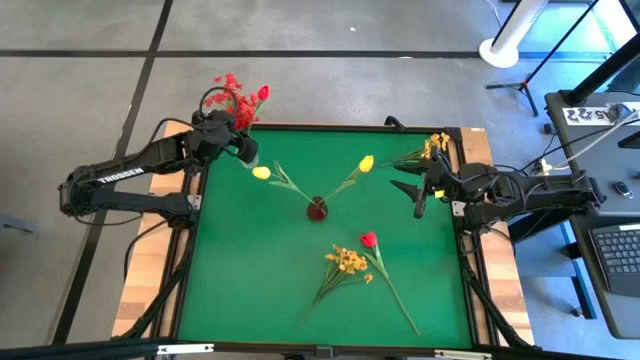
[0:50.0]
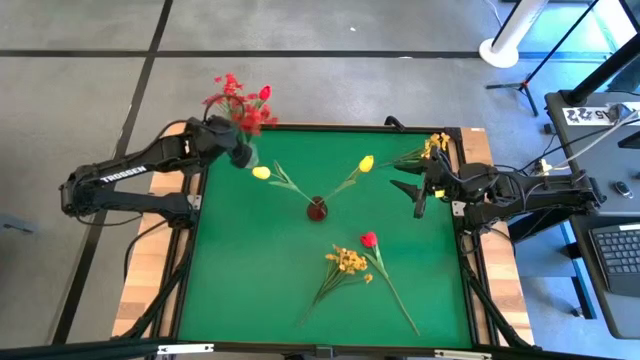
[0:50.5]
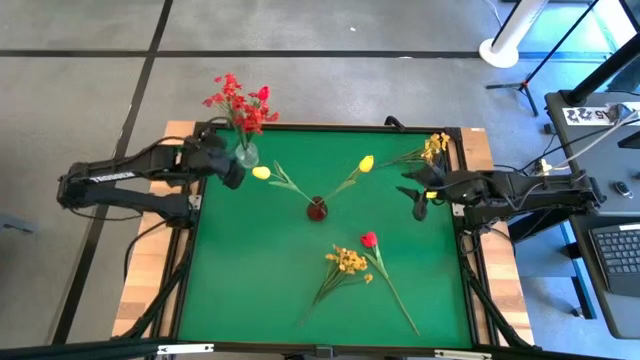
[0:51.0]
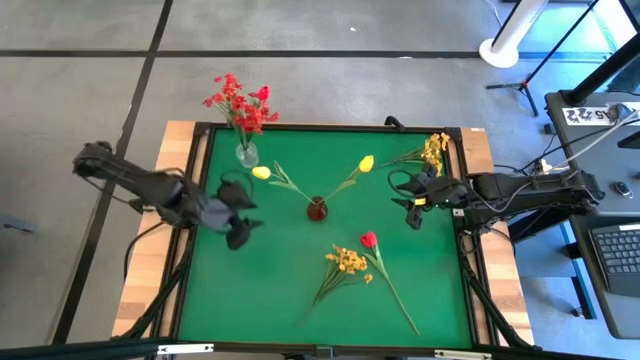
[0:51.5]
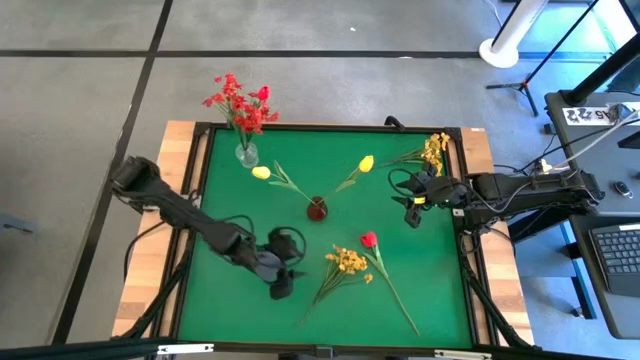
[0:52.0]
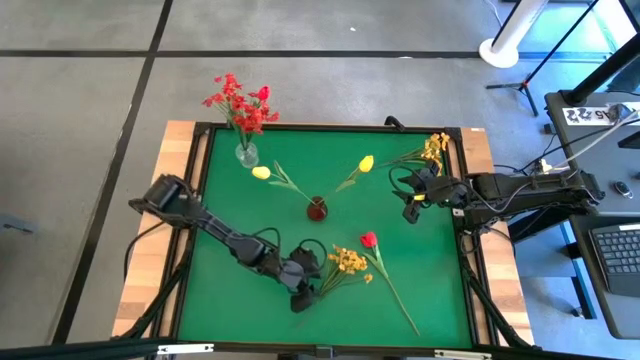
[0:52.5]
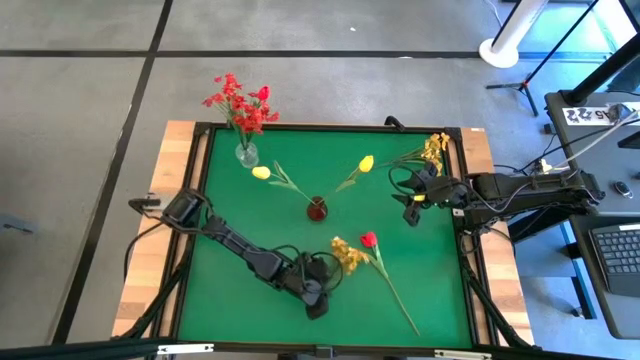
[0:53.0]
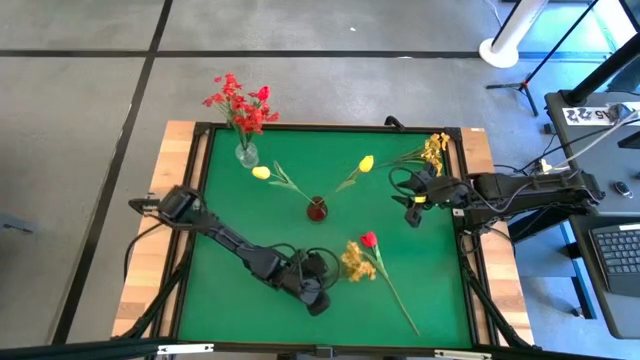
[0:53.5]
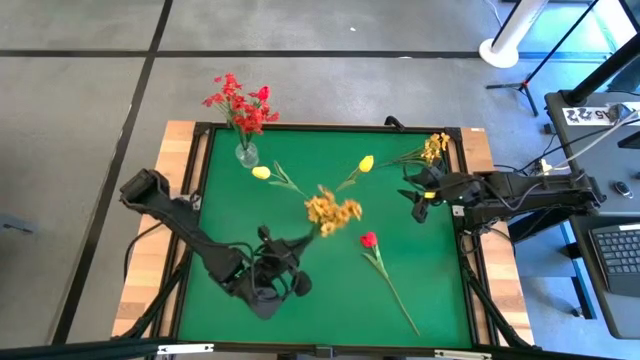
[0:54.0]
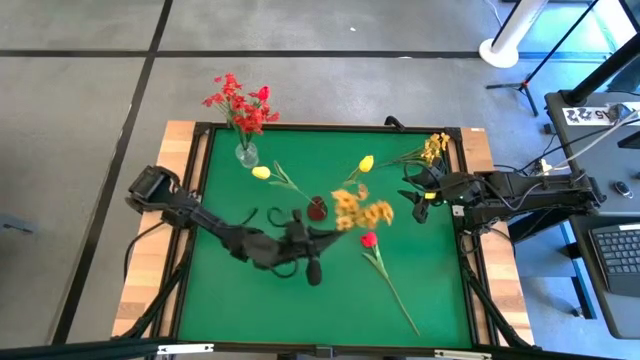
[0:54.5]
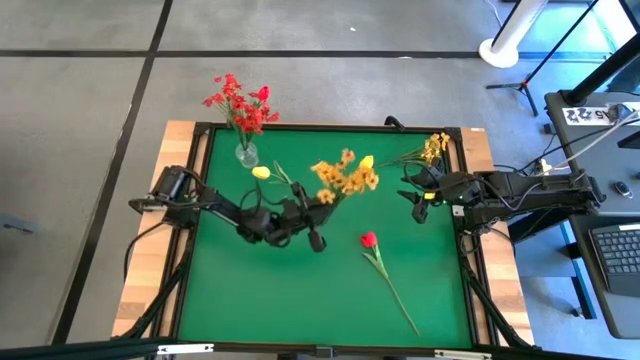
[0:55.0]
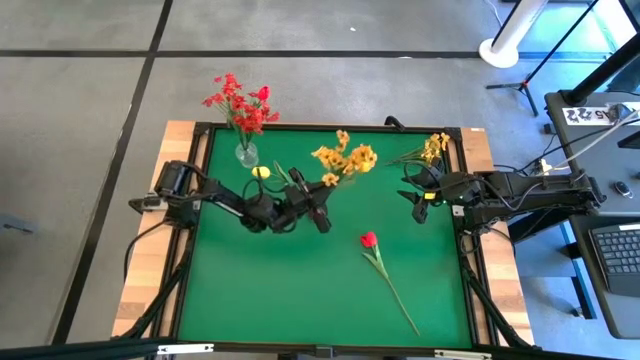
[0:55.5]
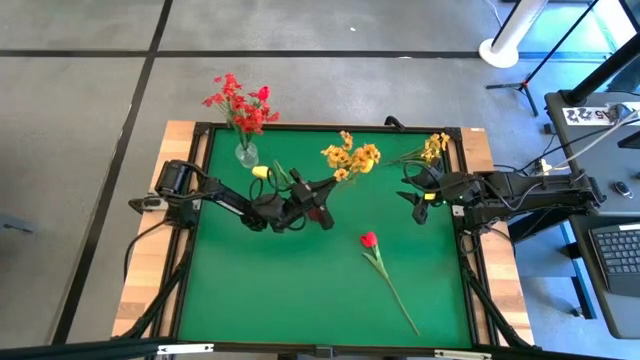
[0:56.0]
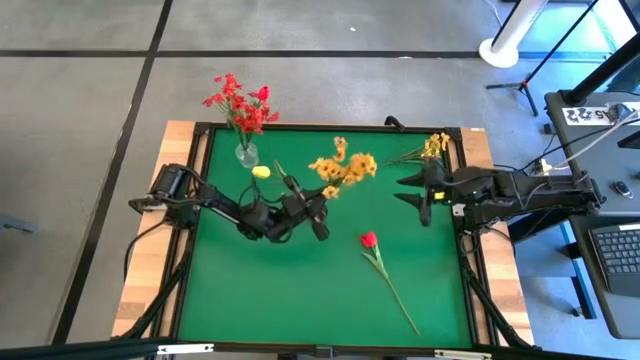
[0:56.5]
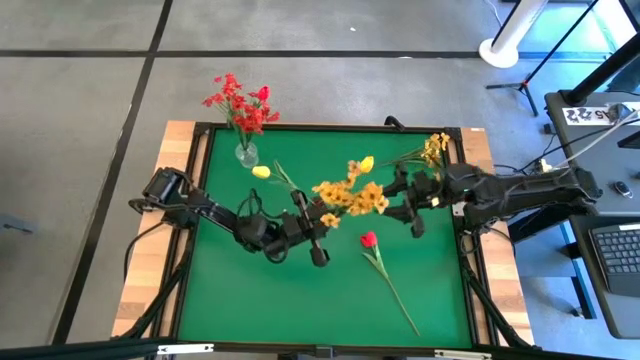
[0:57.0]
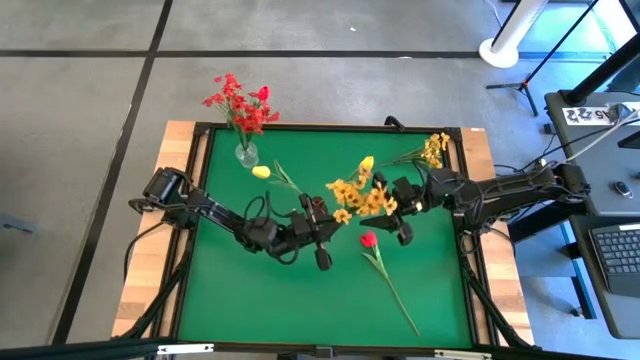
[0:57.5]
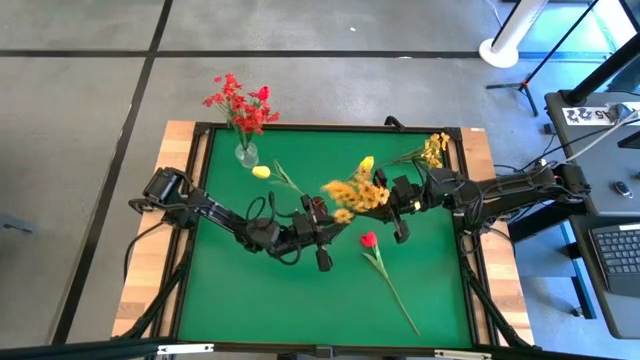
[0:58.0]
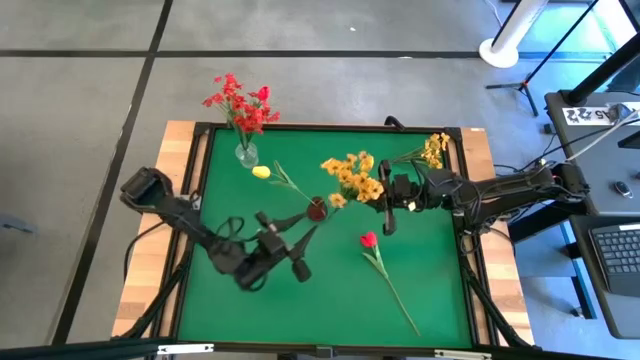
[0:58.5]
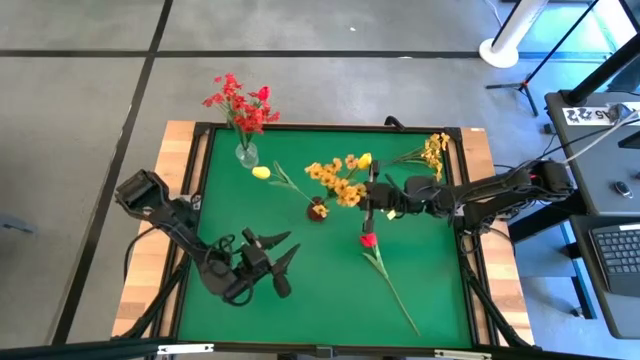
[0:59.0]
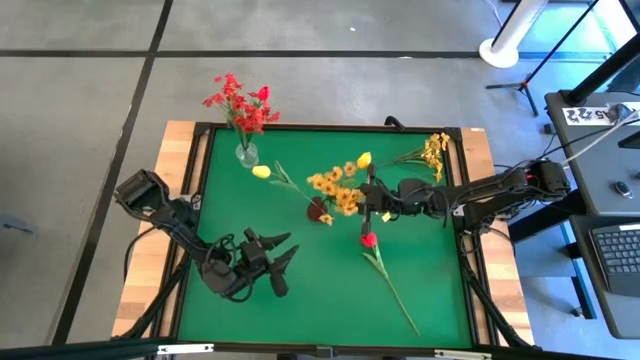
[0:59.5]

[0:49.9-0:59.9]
Task: Sort flowers into vase by color
Put the bottom yellow flowers into the red flower vase

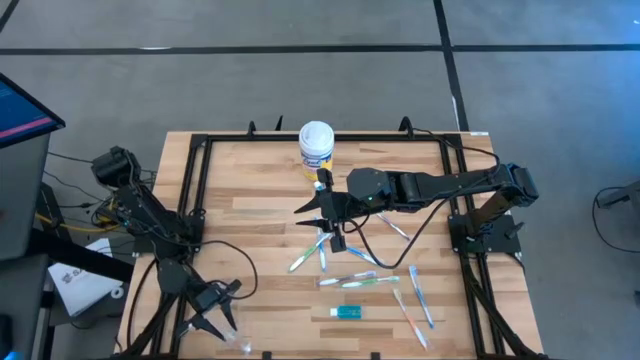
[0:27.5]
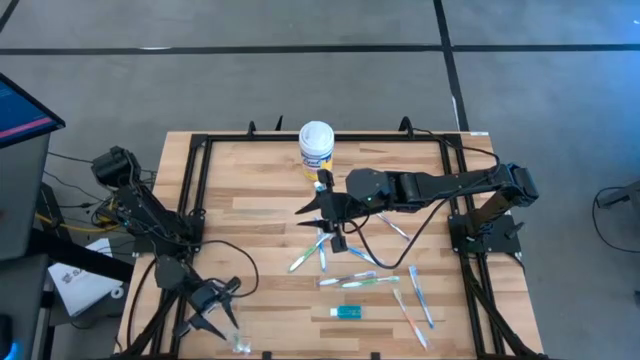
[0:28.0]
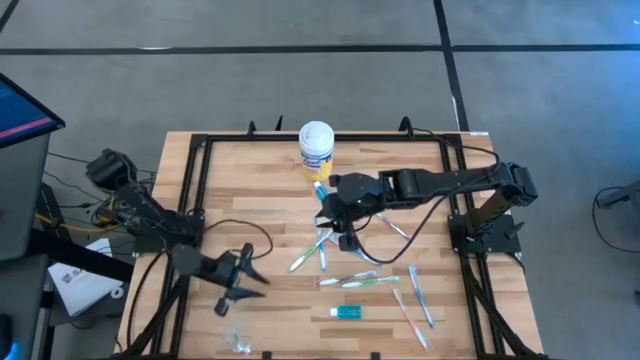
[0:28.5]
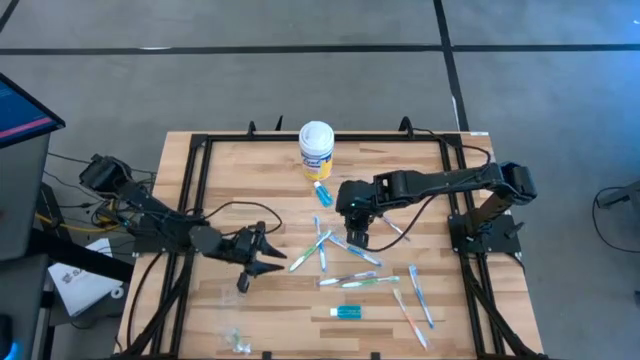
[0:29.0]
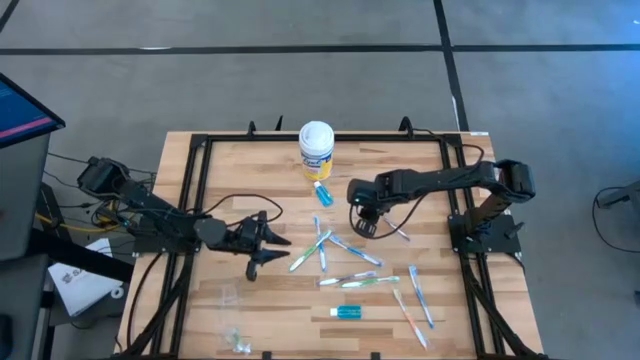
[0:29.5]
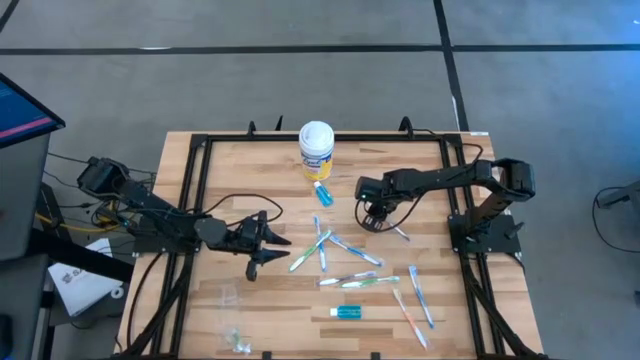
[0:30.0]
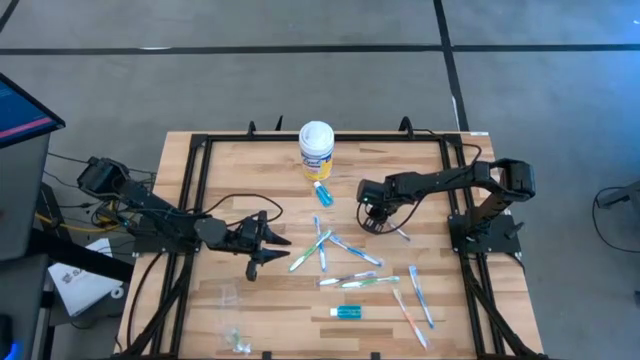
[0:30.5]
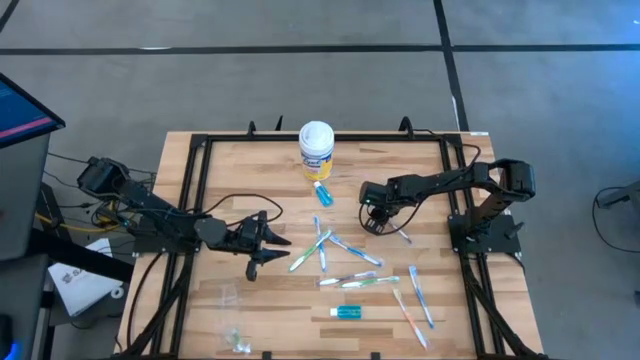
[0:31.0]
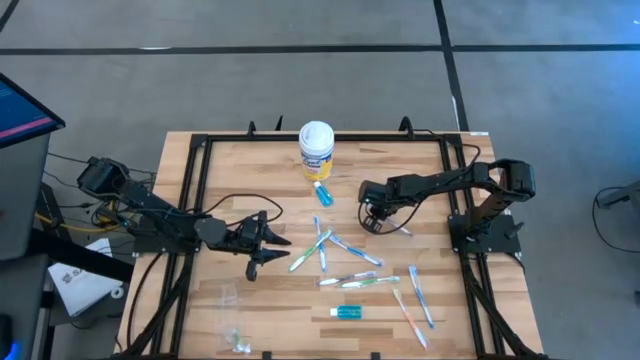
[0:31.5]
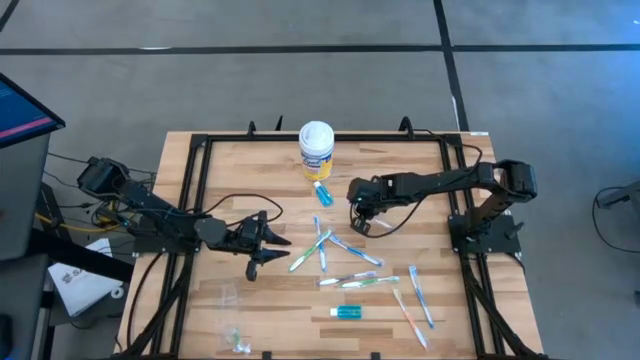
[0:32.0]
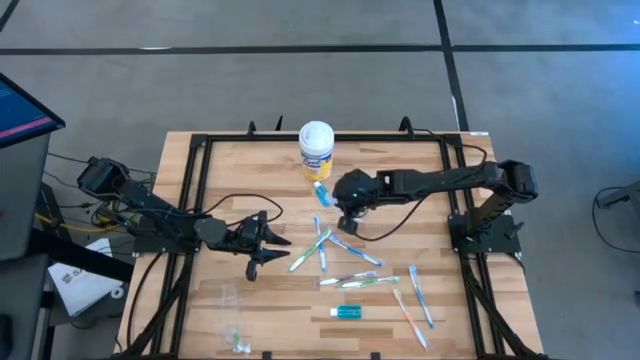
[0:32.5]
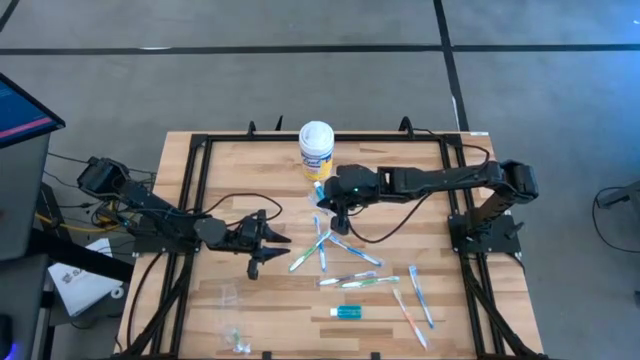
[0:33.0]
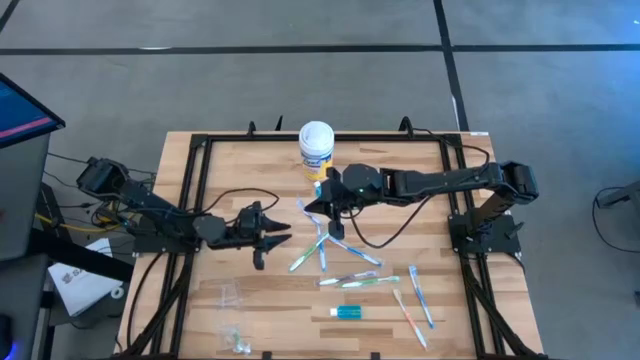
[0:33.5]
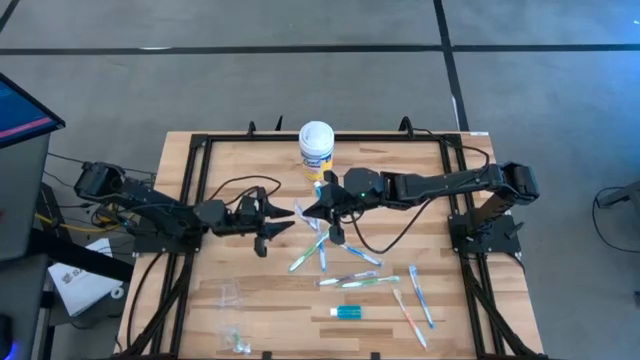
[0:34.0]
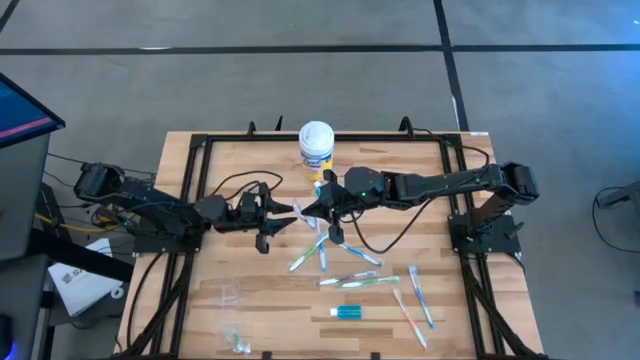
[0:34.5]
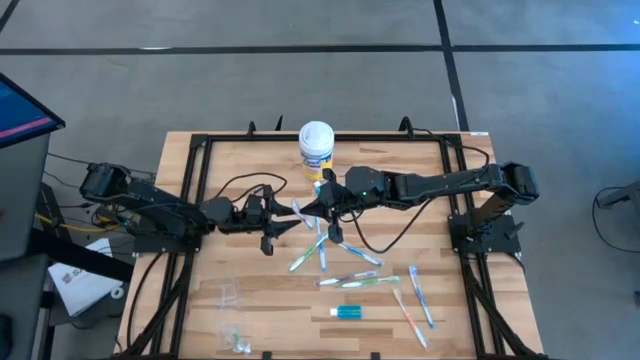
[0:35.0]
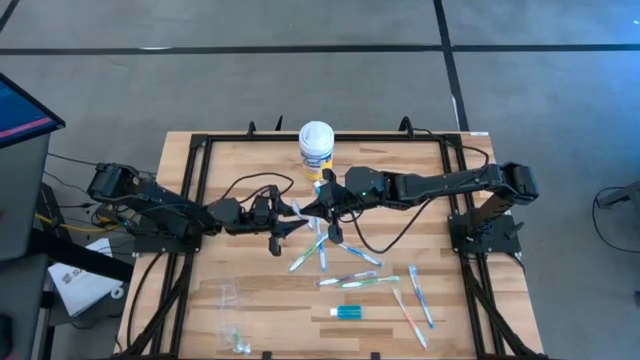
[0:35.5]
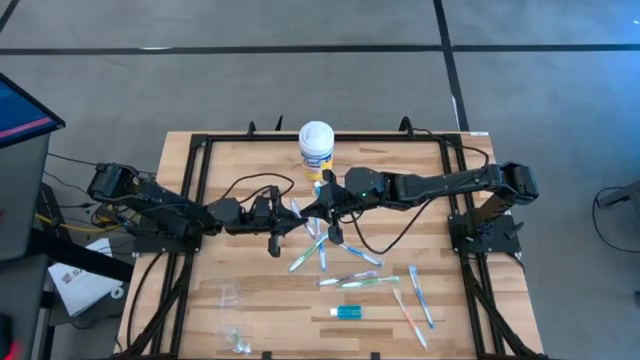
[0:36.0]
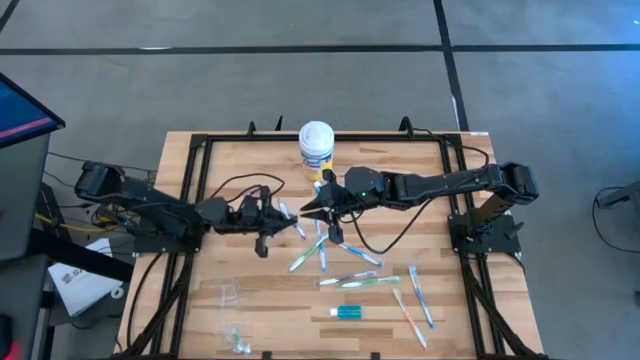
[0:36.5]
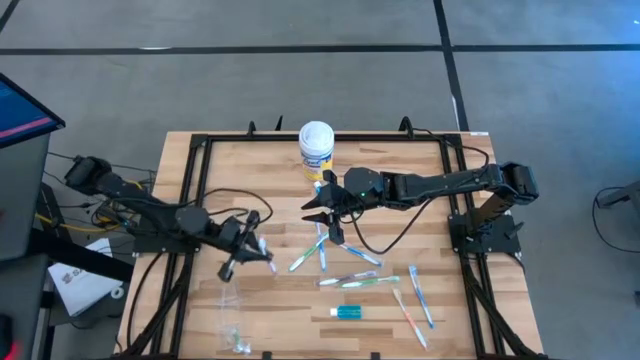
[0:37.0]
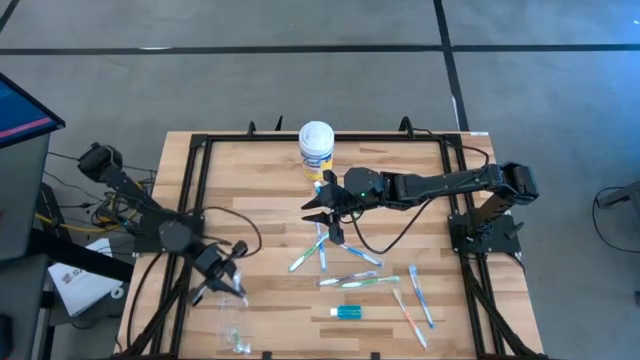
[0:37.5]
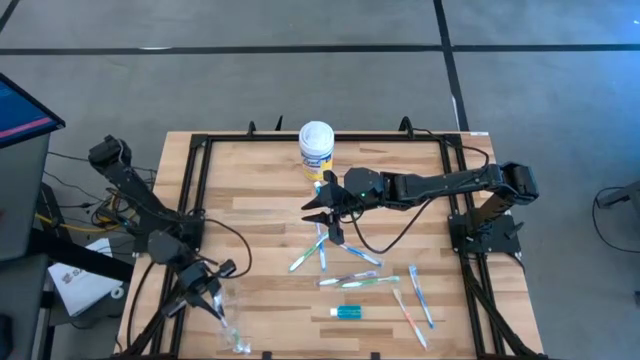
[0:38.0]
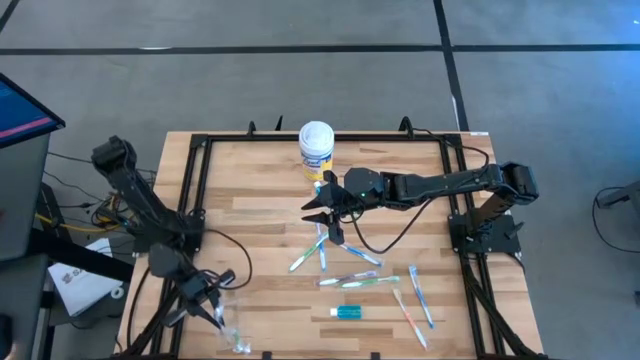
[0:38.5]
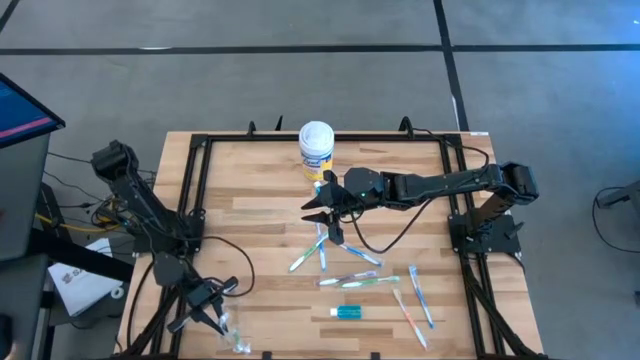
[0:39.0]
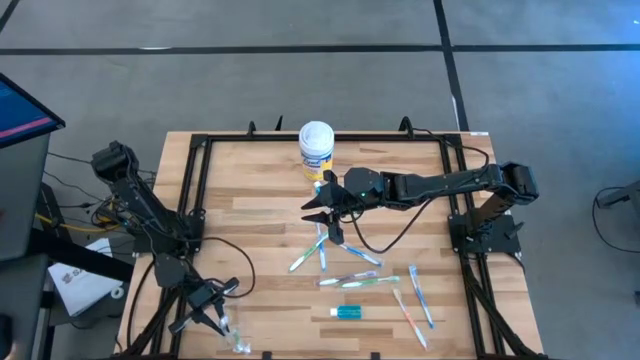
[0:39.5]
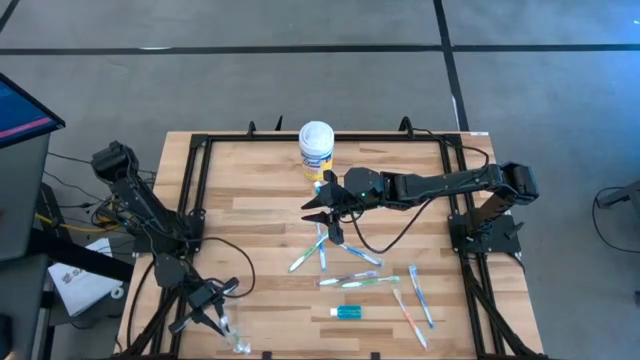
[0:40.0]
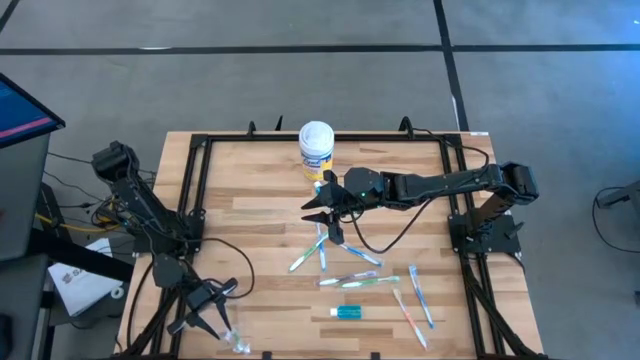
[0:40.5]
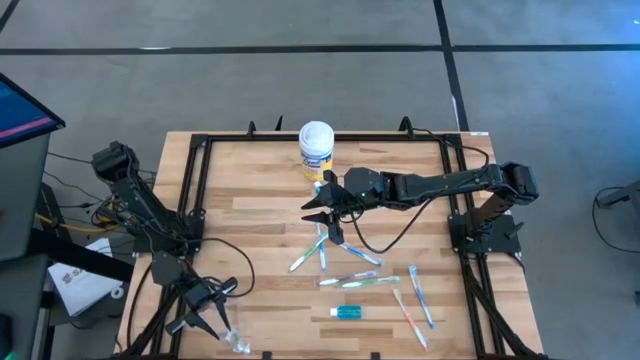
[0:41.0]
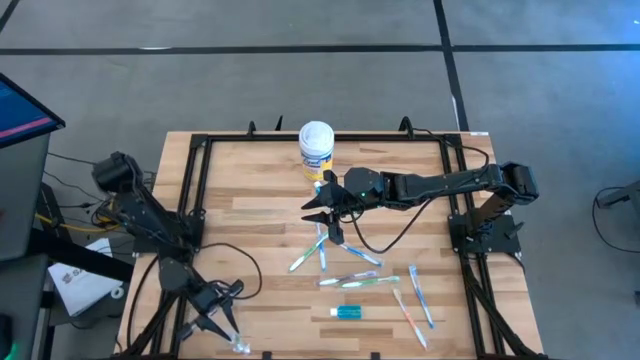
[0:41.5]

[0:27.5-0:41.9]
Task: Pick & Place toothbrushing station
Put the top purple toothbrush into the transparent organizer
